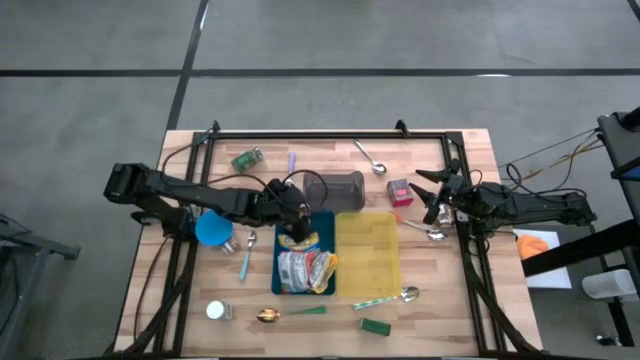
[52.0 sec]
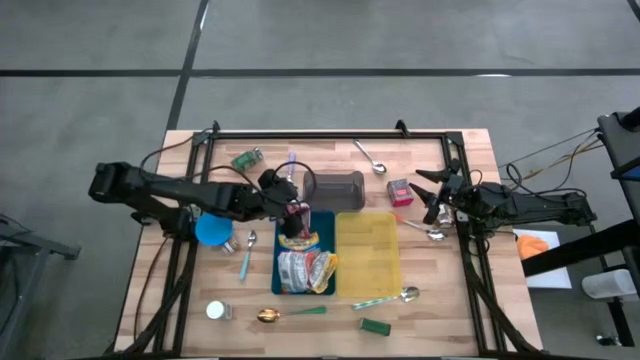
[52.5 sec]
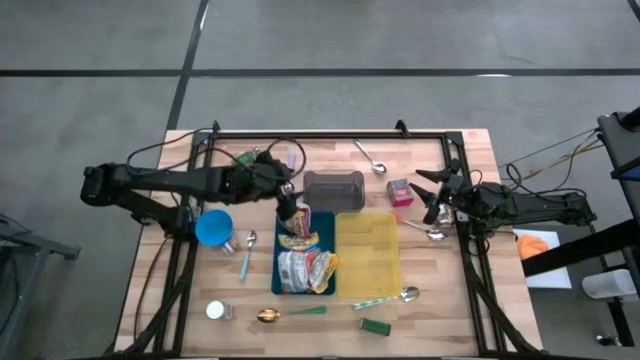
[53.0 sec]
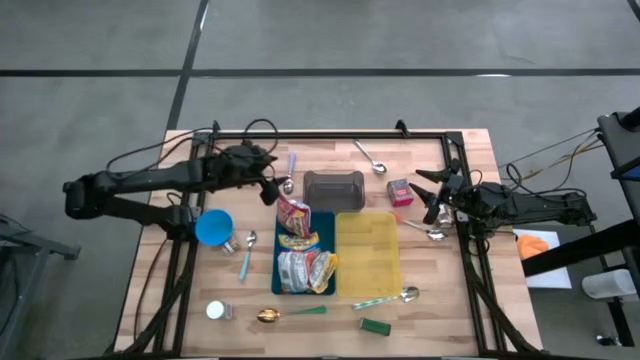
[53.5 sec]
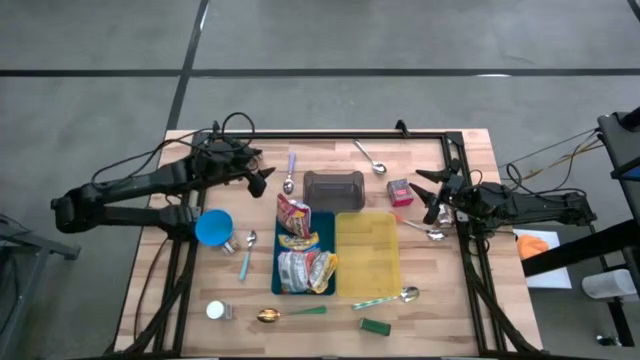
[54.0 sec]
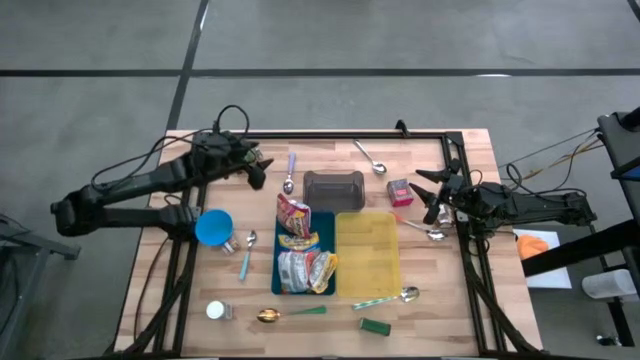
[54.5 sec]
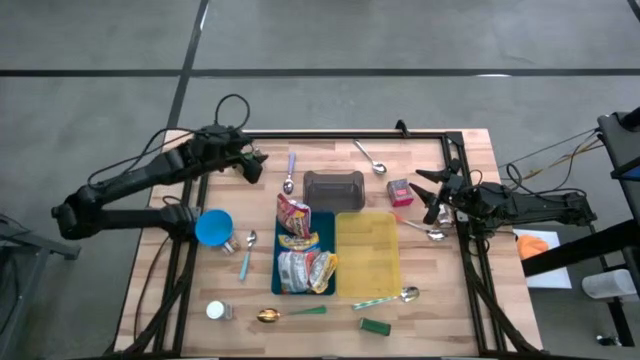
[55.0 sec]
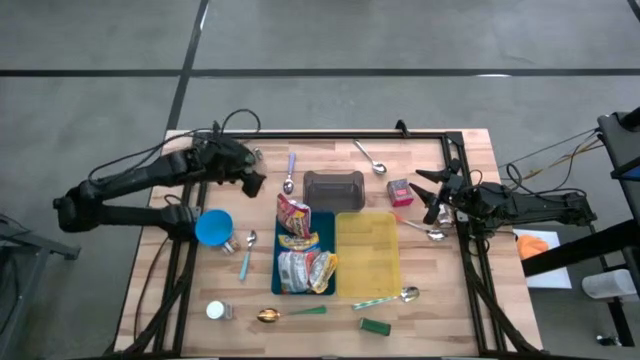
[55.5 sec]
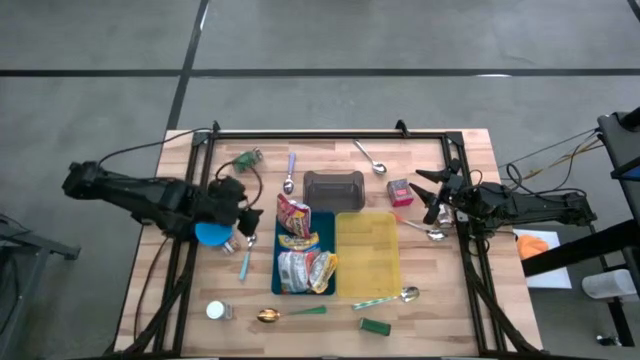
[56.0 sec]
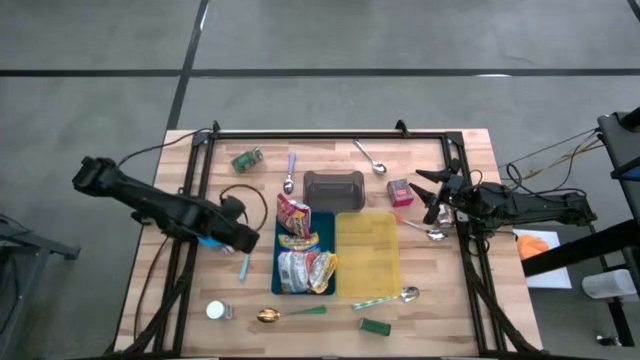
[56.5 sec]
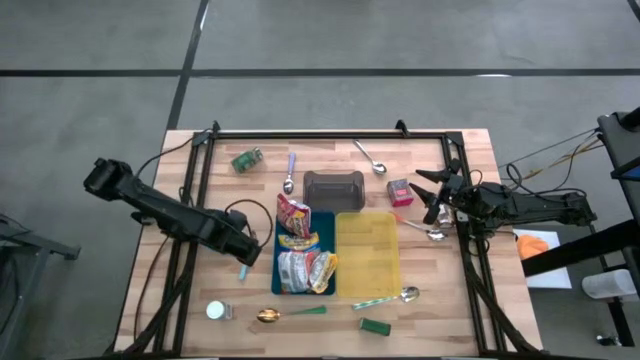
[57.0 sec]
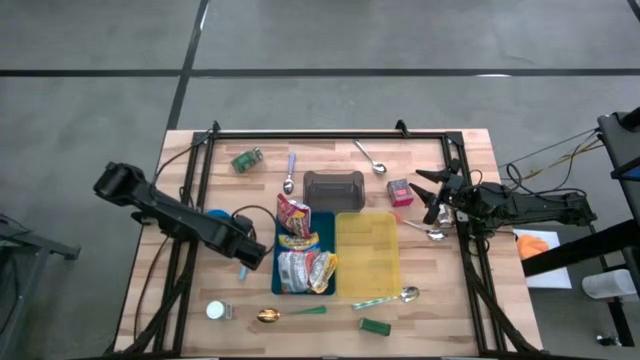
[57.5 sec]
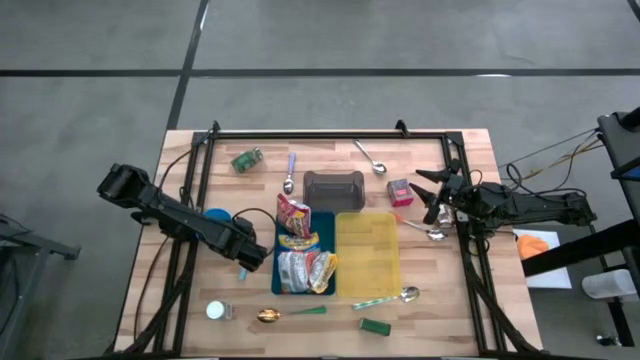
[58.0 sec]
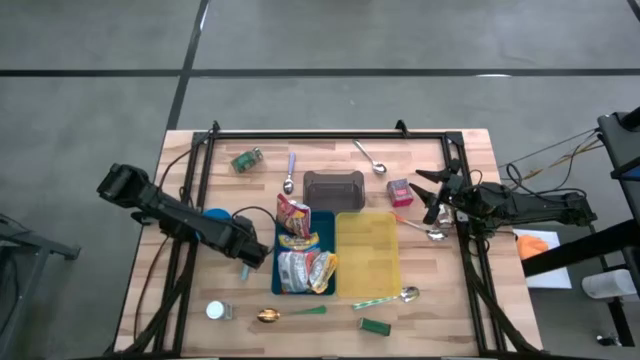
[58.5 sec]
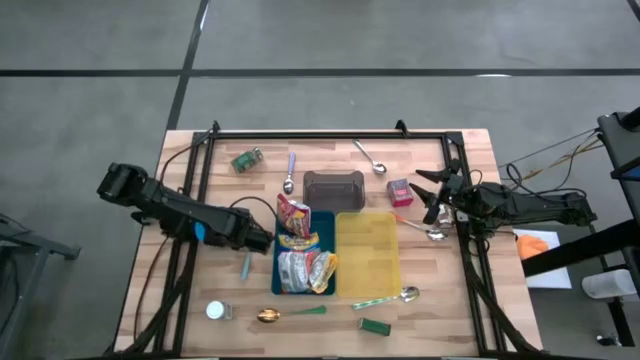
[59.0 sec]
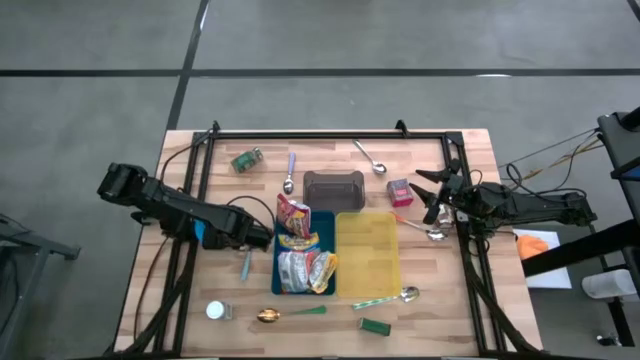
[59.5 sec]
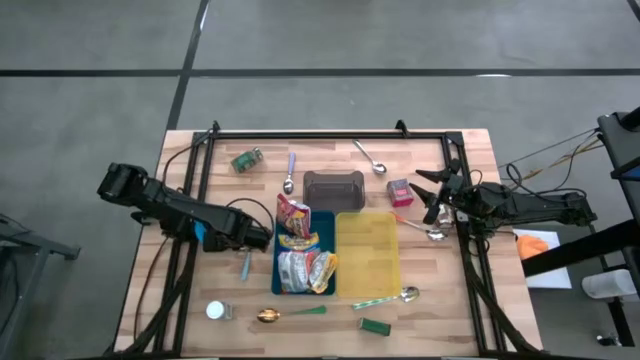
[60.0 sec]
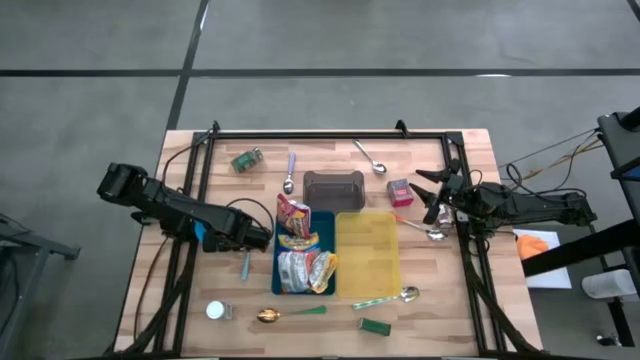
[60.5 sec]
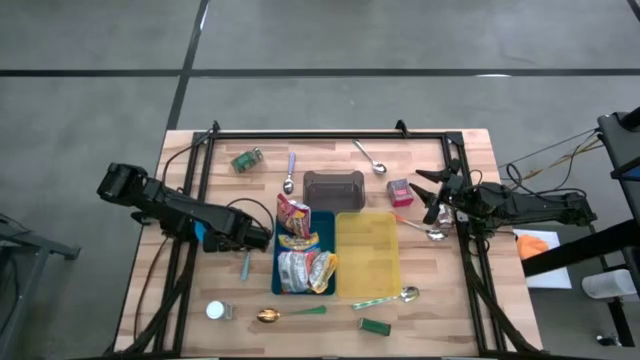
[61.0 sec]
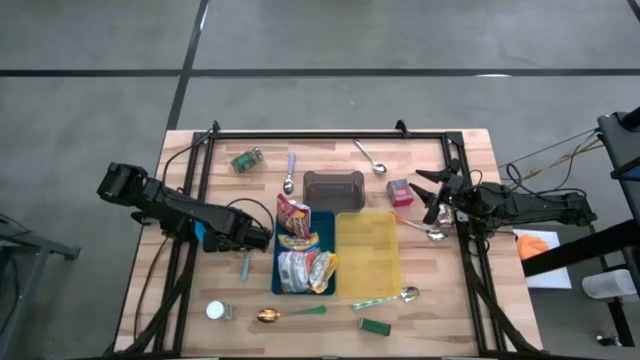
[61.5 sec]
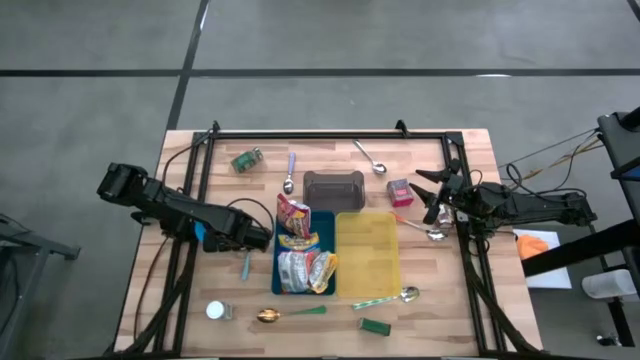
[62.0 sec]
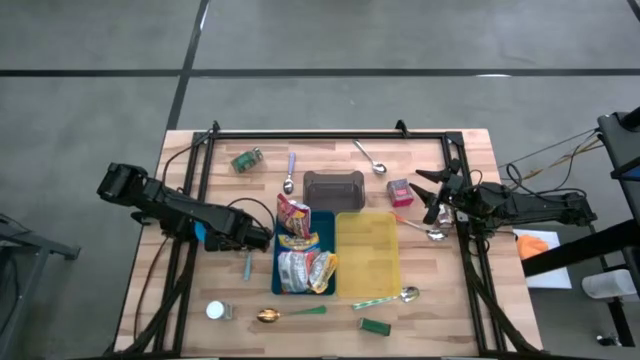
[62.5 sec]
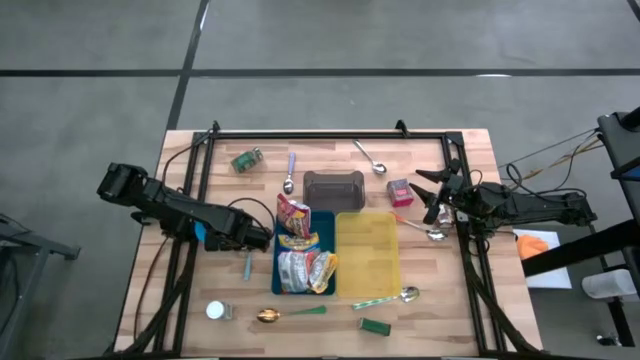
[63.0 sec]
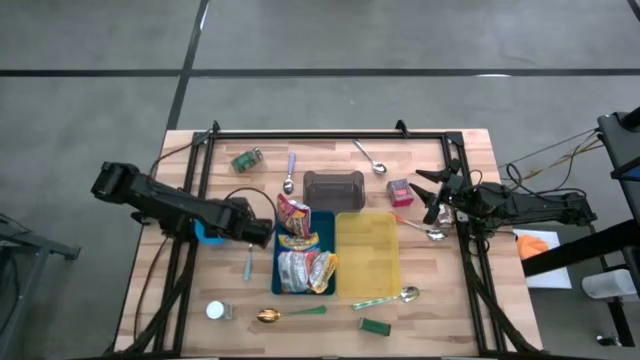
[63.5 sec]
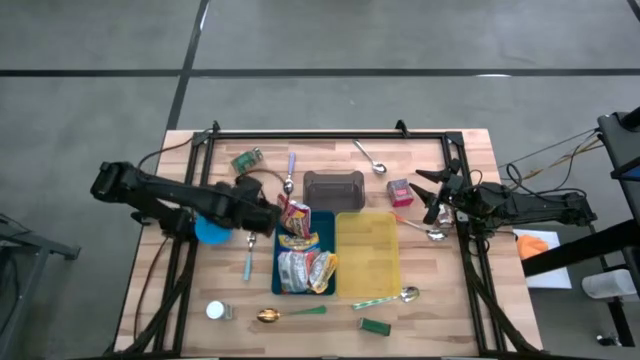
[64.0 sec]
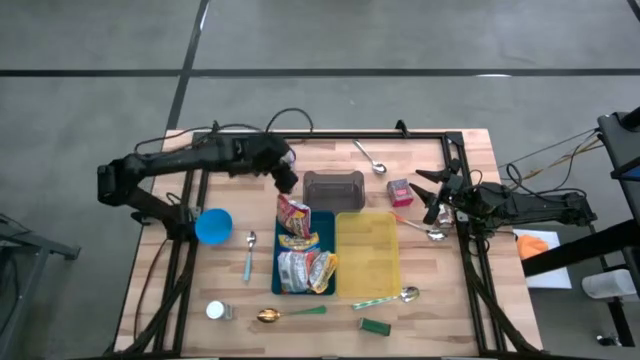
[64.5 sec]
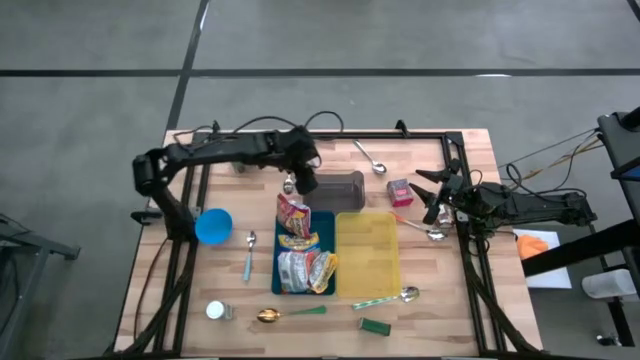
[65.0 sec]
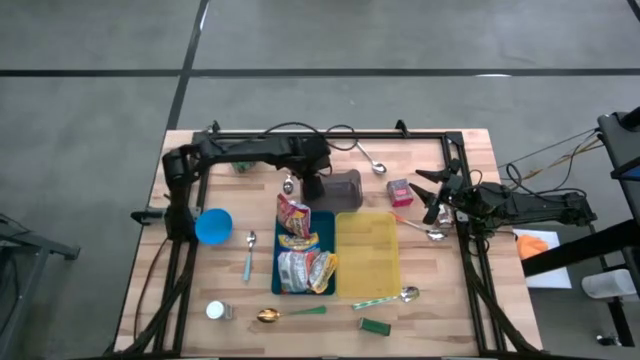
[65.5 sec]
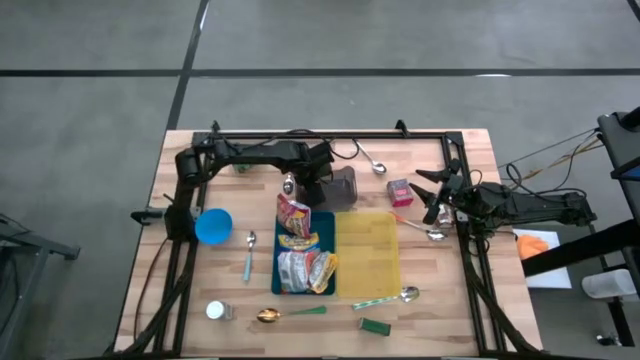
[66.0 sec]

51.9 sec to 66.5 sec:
Put the brown spice bottle into the black bin
